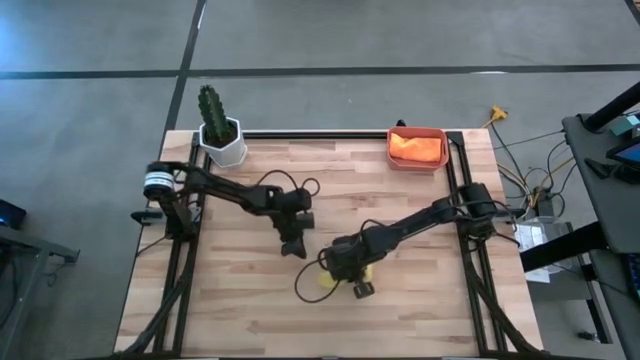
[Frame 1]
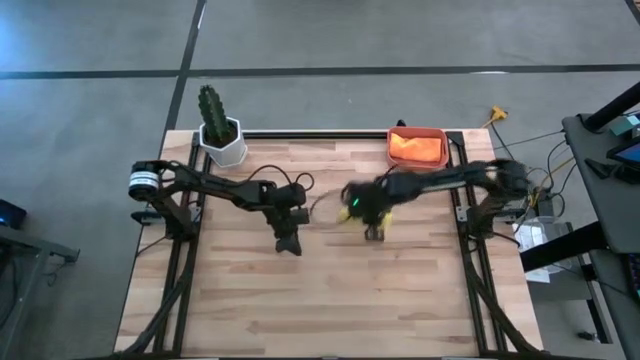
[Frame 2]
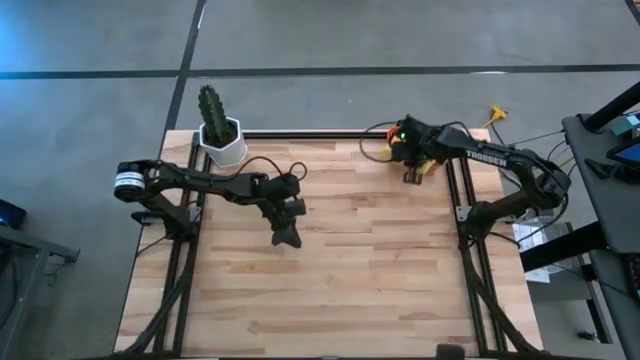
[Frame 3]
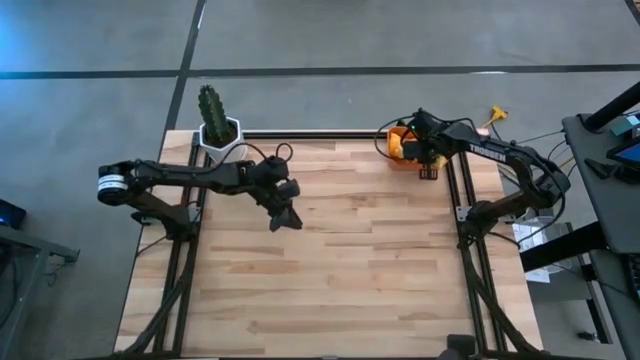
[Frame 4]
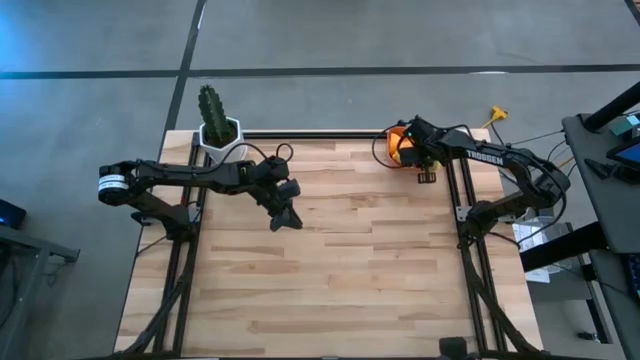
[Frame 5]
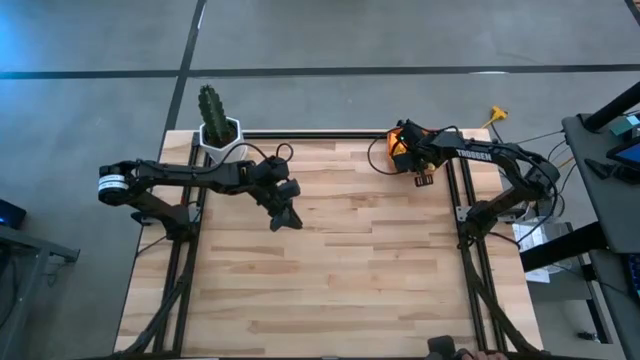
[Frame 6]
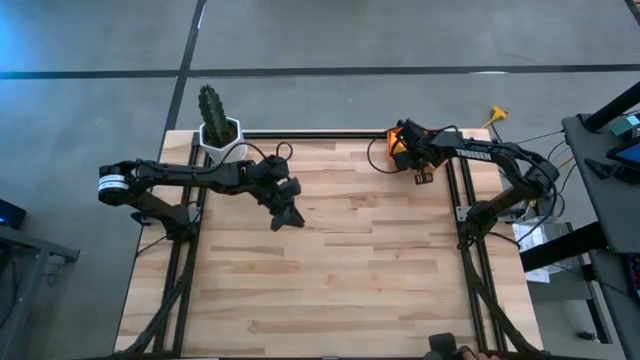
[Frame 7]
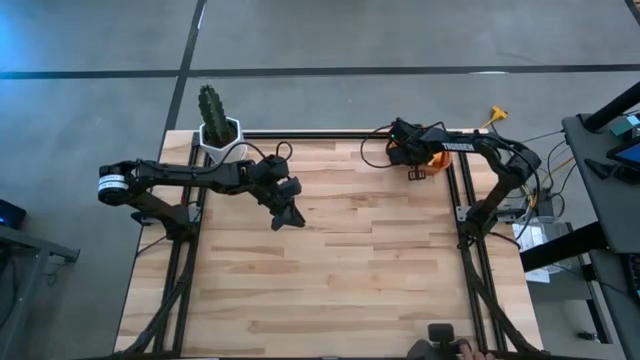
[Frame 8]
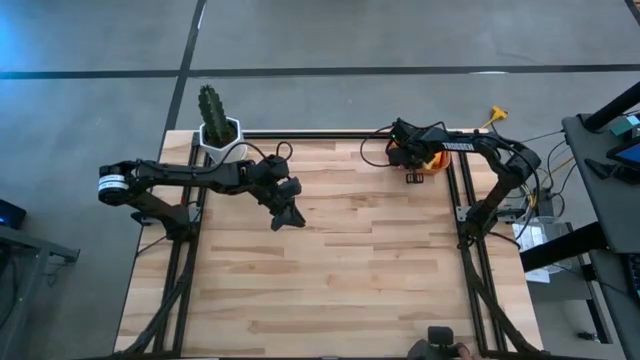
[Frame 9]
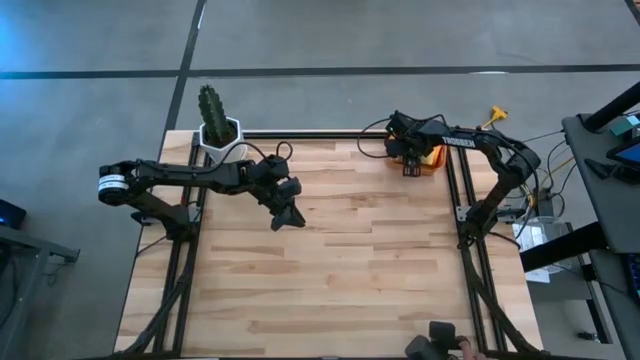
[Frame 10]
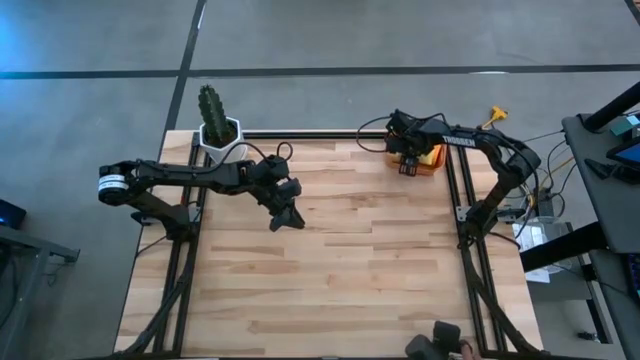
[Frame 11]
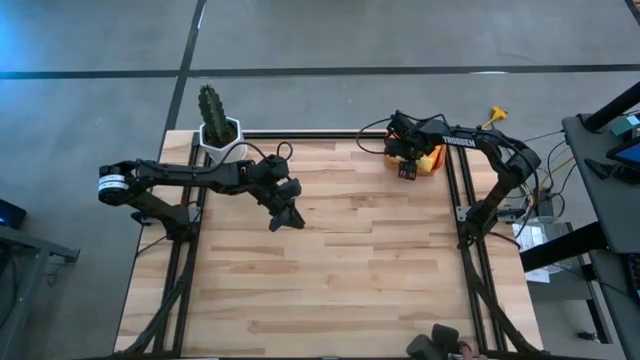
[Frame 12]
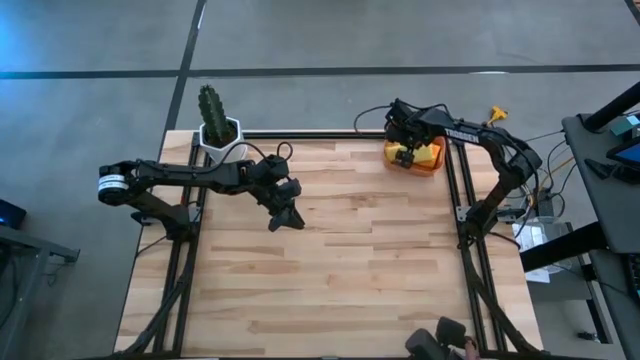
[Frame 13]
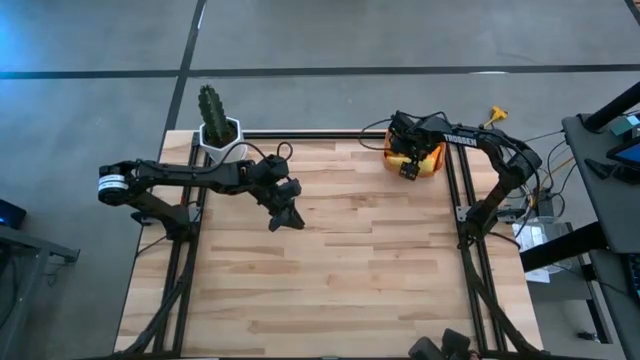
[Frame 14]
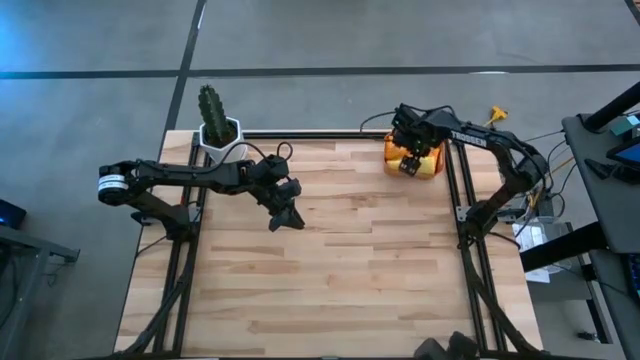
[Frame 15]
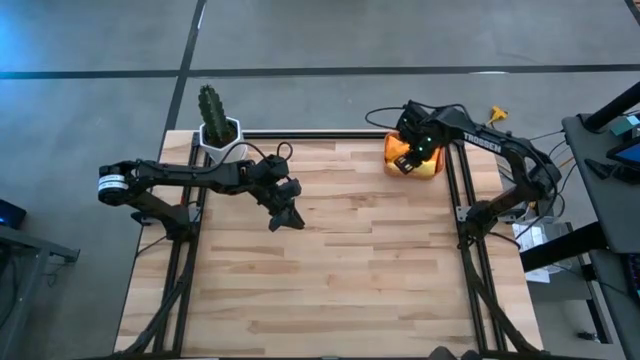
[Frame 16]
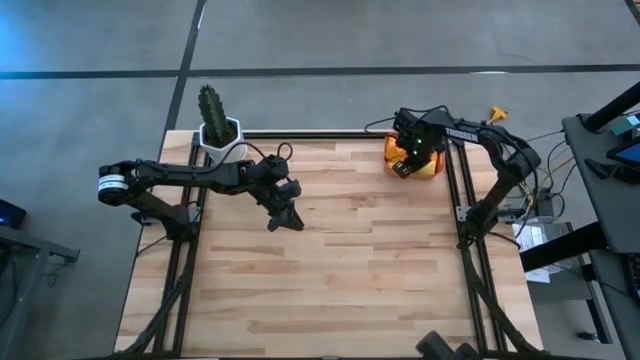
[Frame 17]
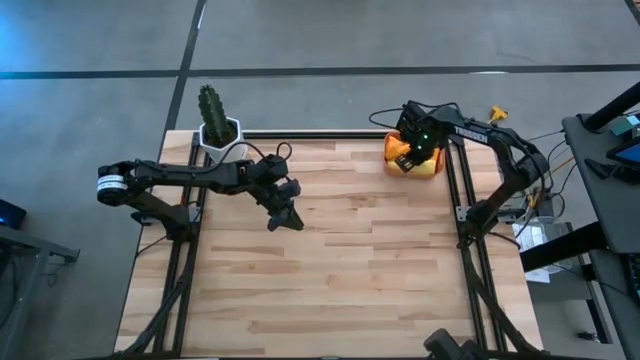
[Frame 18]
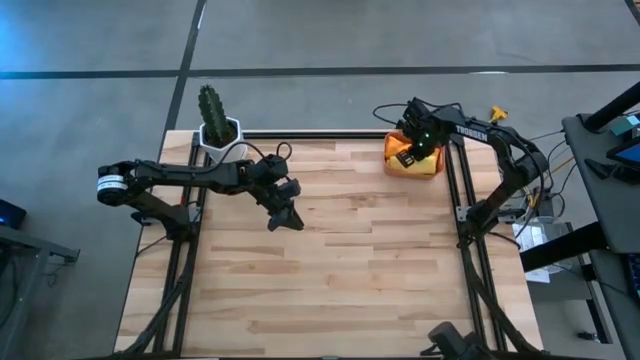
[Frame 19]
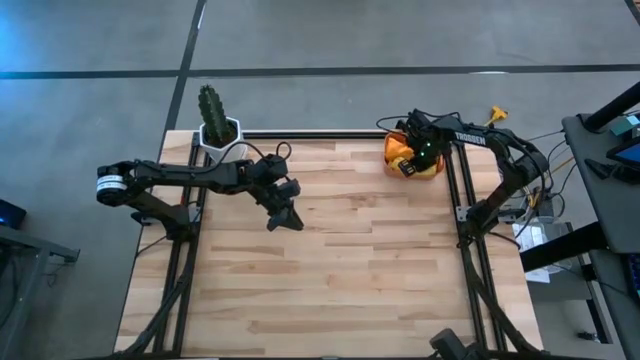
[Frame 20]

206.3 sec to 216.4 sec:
Task: Roll microfiber towels into tight, uniform cylinder then place into a basket
Put the yellow towel into the orange bin

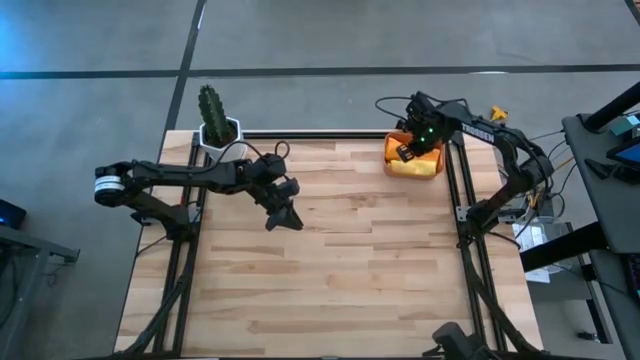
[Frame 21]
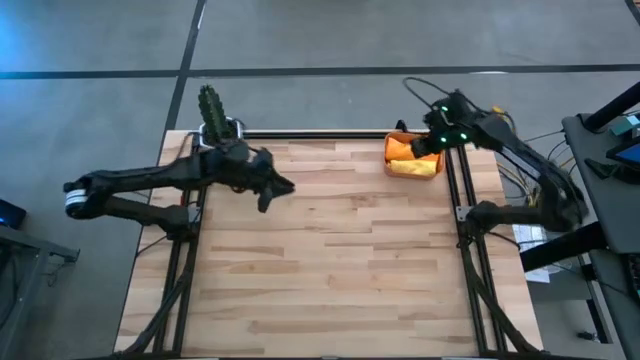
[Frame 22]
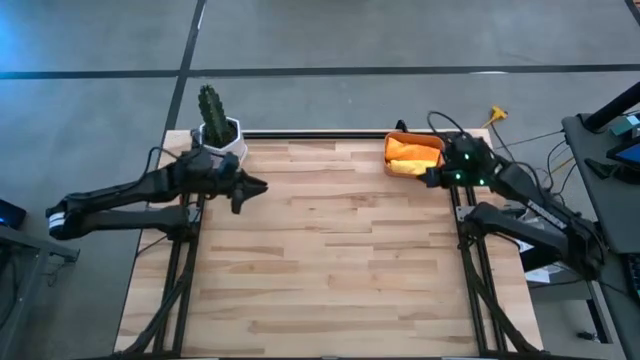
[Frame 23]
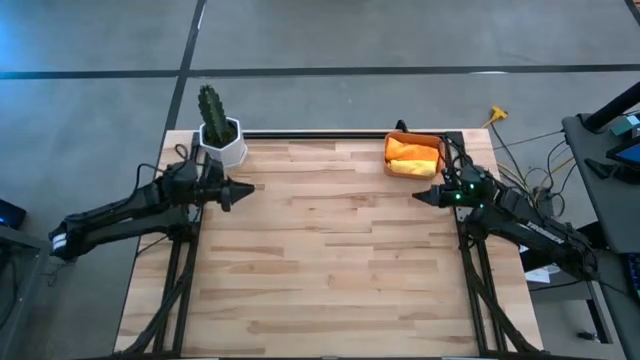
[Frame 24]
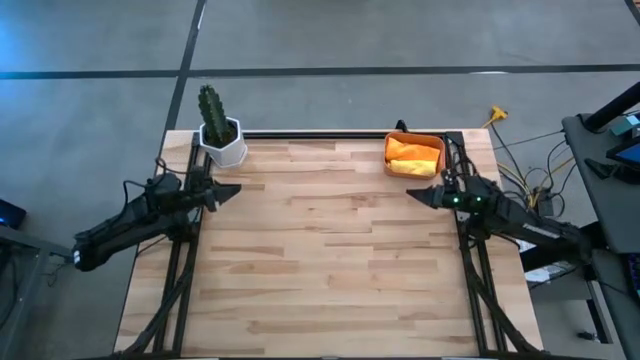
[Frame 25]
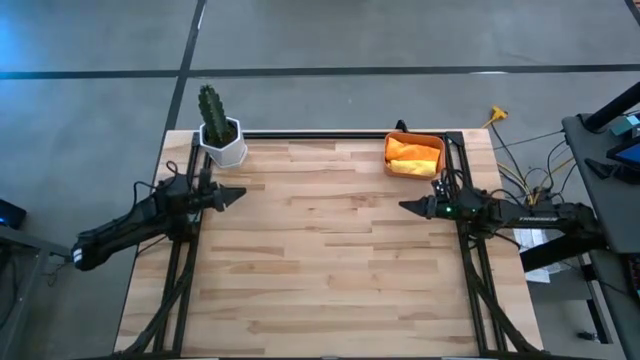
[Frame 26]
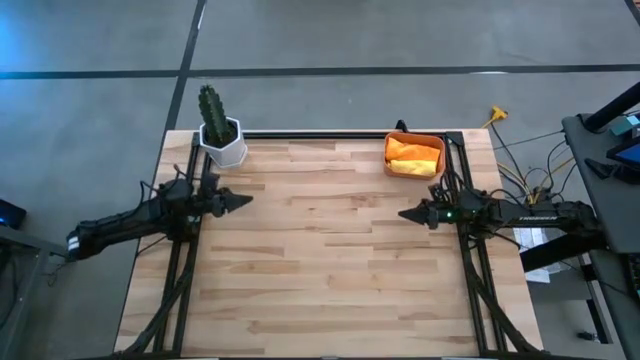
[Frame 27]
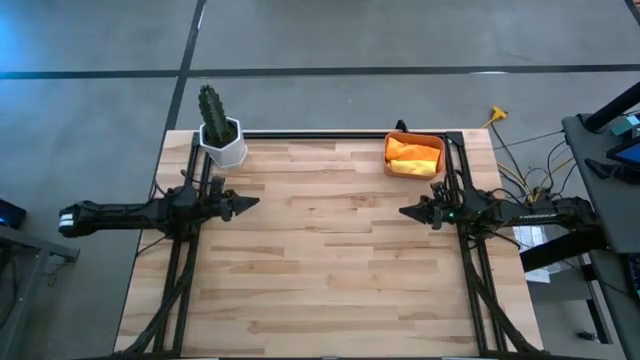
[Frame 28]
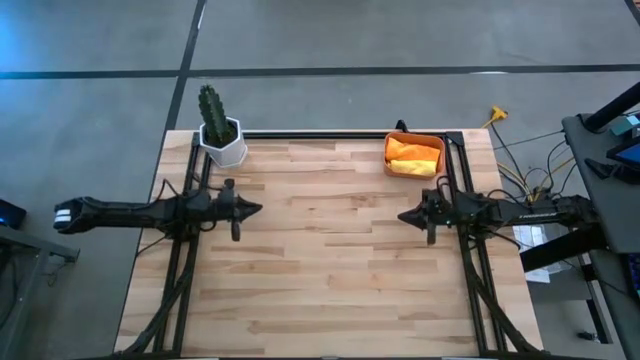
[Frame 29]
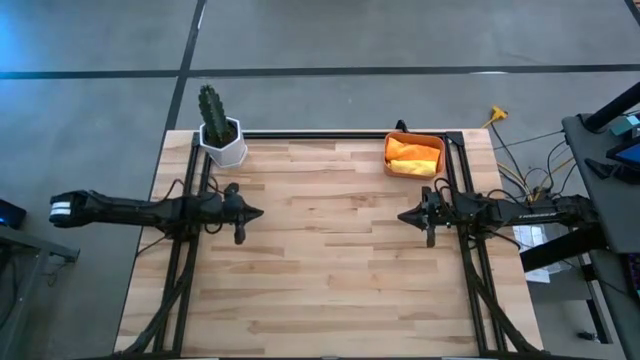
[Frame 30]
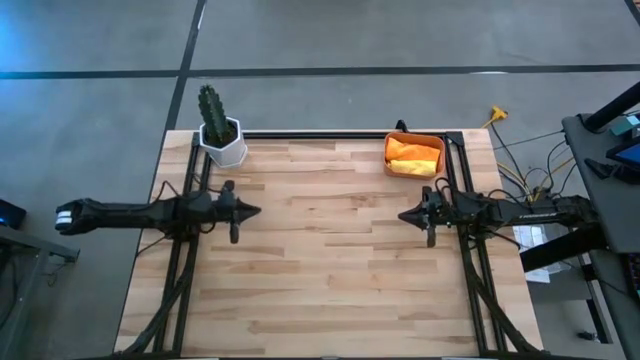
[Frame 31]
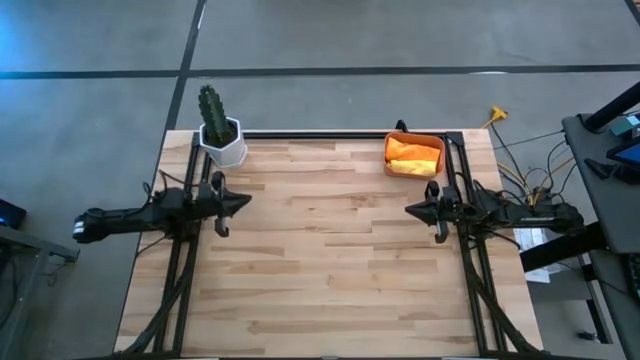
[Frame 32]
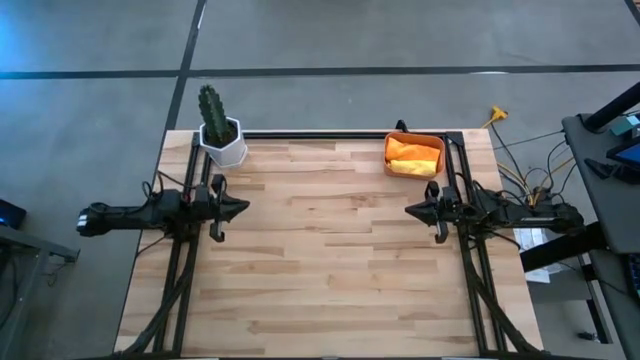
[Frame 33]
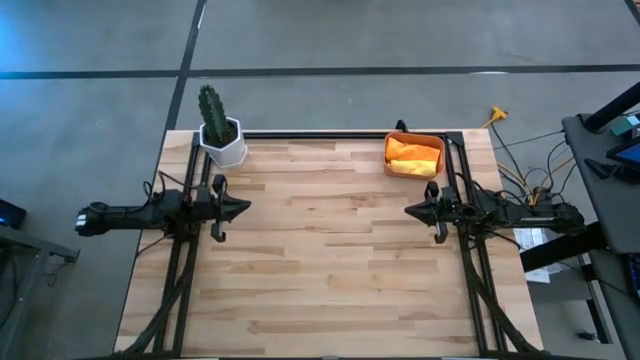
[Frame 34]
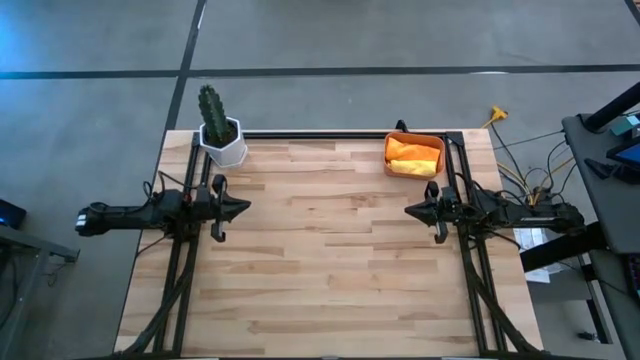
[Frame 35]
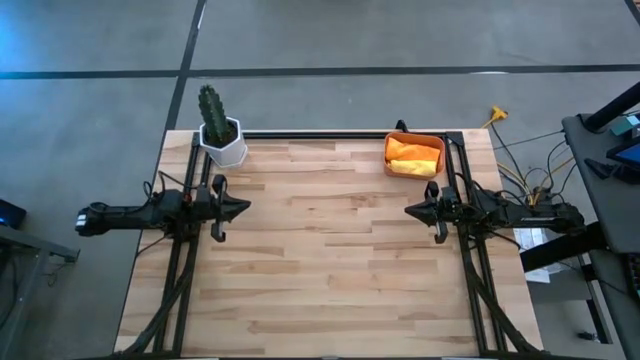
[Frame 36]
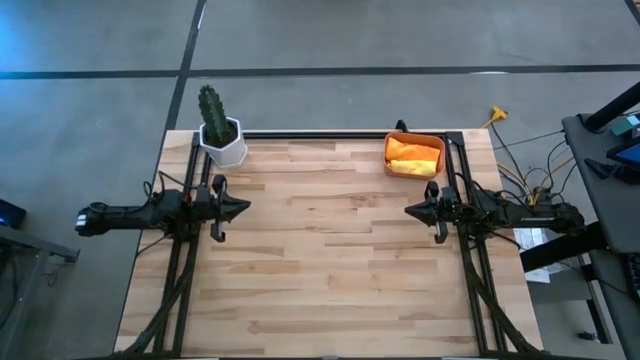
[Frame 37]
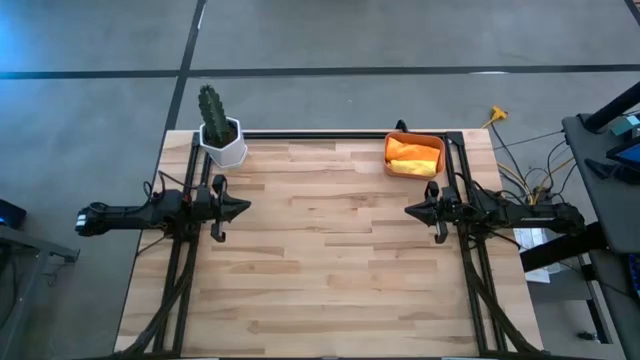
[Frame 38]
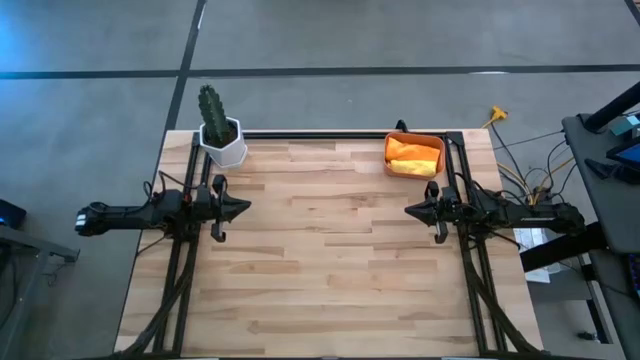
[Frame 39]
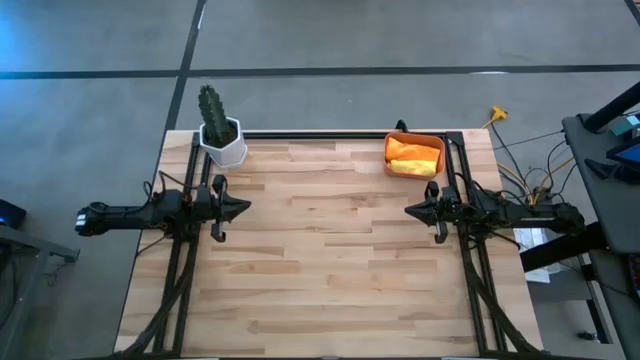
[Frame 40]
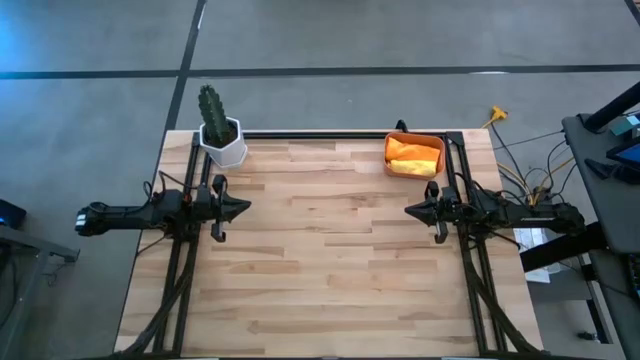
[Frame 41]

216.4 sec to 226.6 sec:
Return to Home Position
